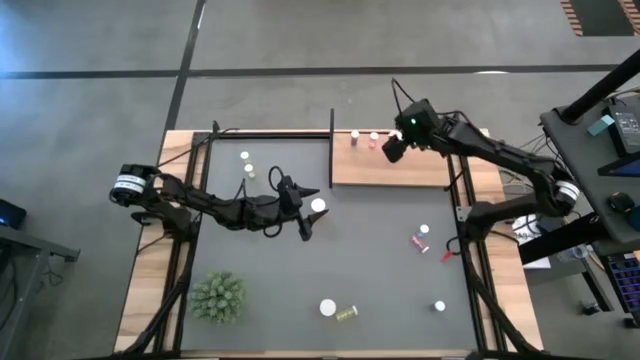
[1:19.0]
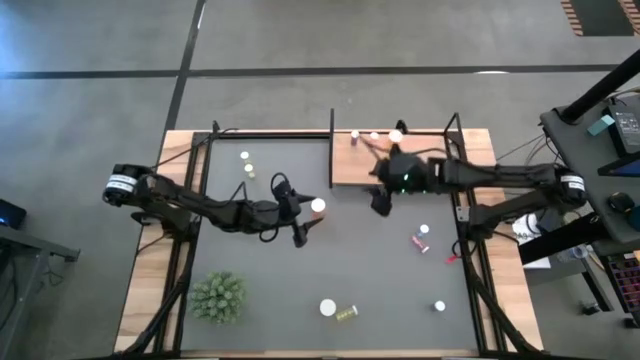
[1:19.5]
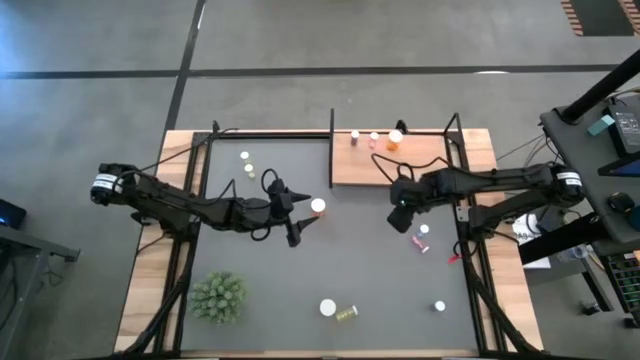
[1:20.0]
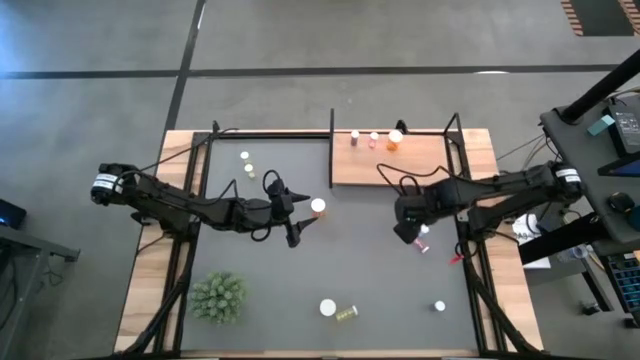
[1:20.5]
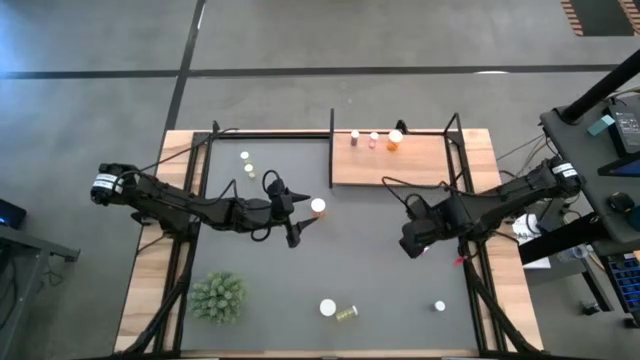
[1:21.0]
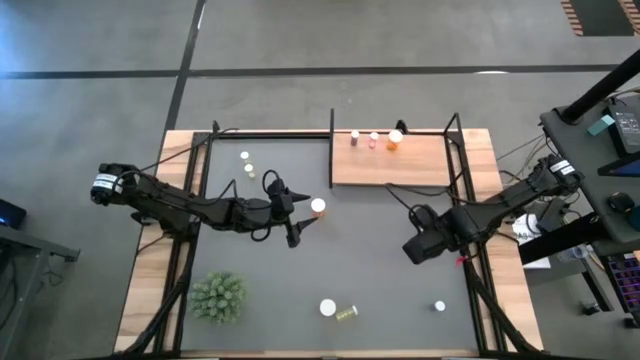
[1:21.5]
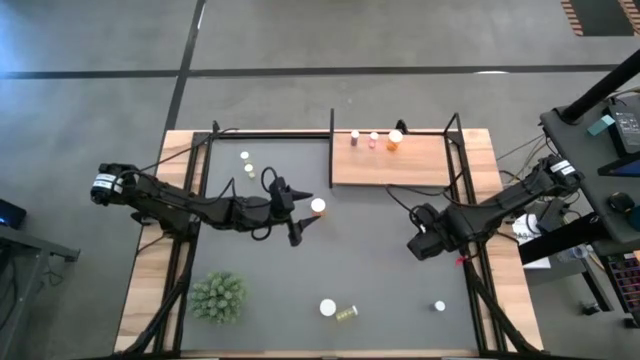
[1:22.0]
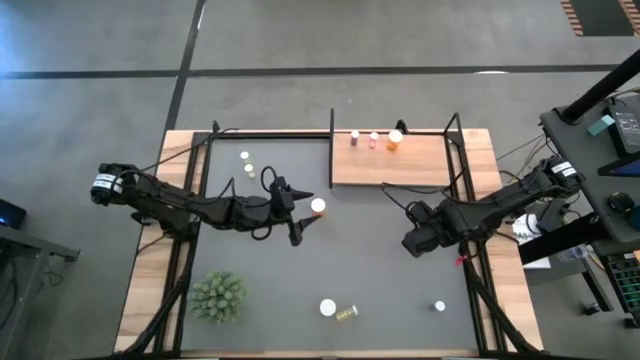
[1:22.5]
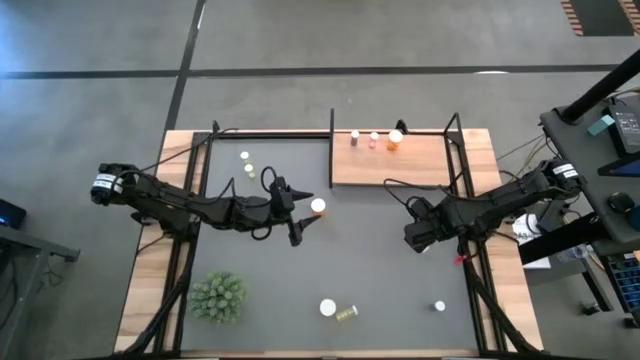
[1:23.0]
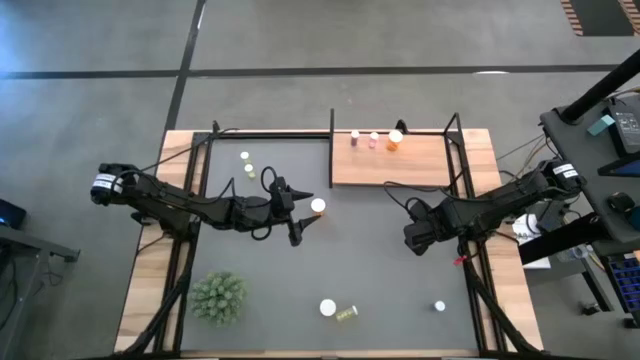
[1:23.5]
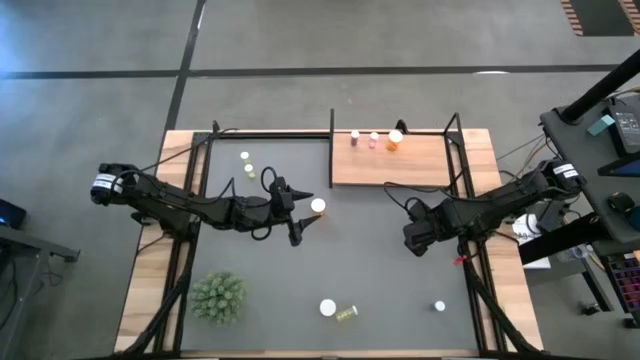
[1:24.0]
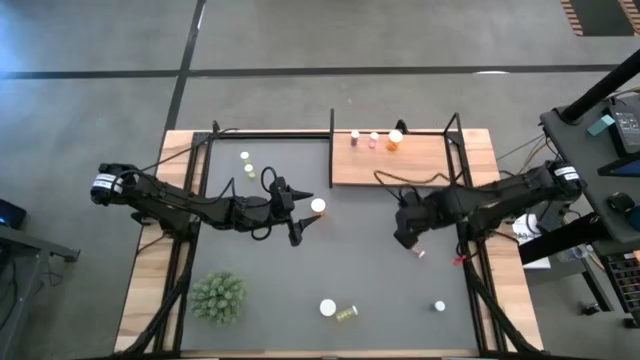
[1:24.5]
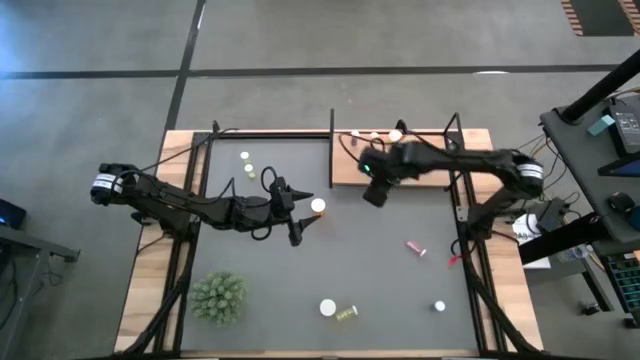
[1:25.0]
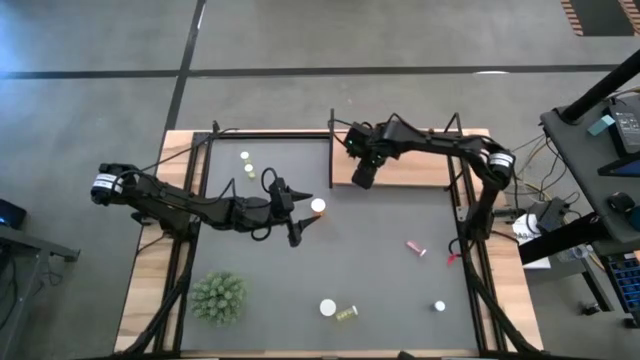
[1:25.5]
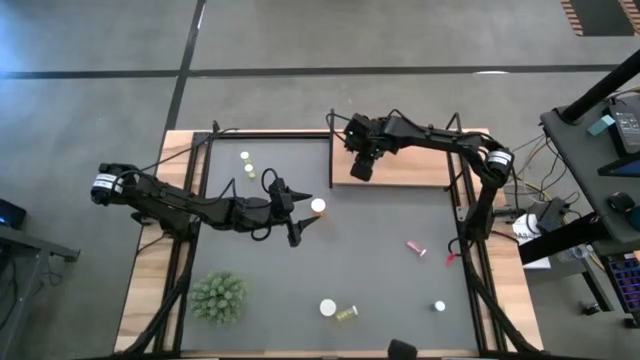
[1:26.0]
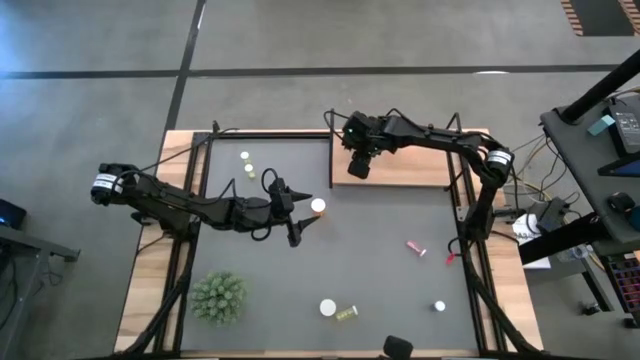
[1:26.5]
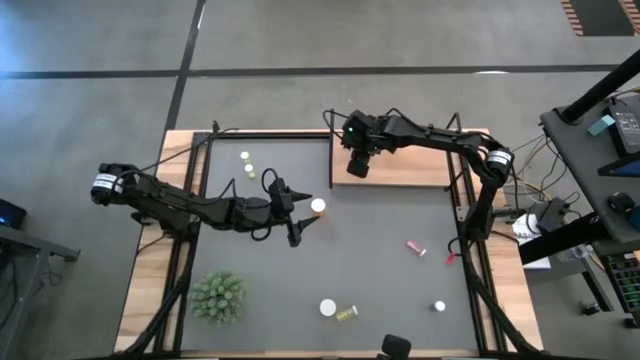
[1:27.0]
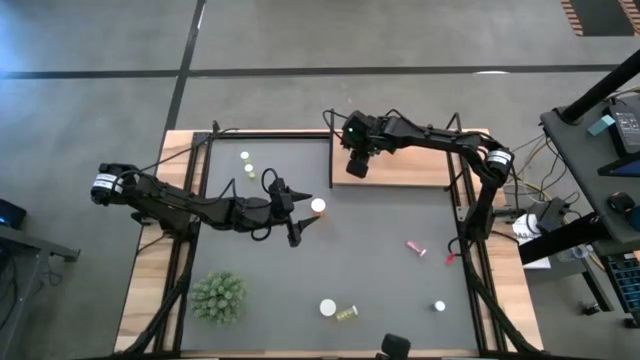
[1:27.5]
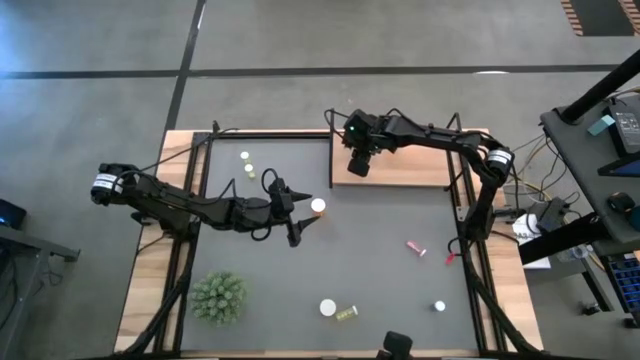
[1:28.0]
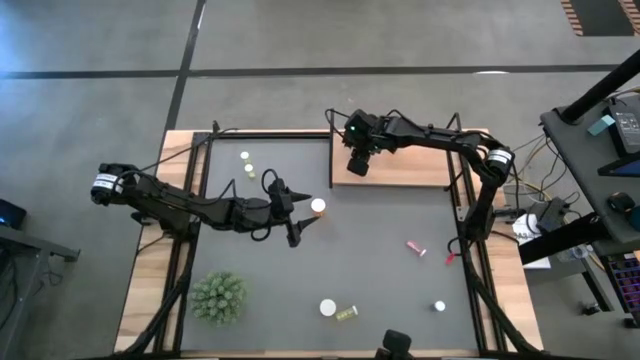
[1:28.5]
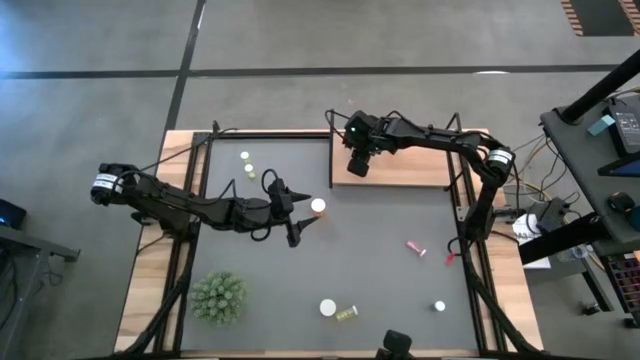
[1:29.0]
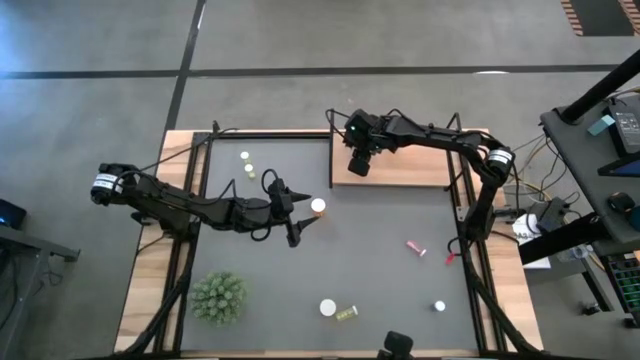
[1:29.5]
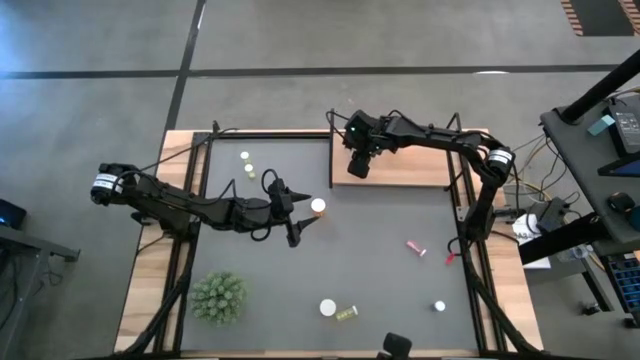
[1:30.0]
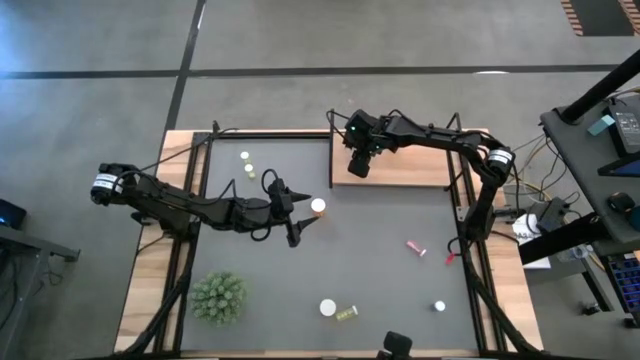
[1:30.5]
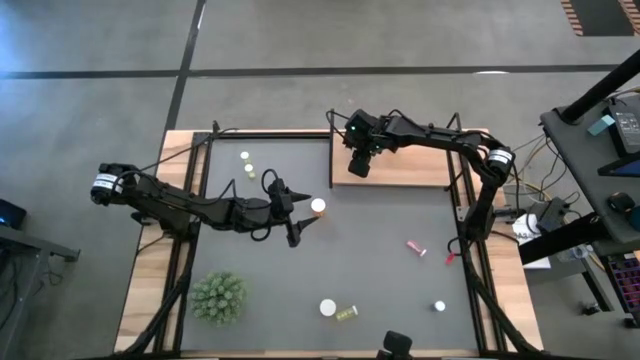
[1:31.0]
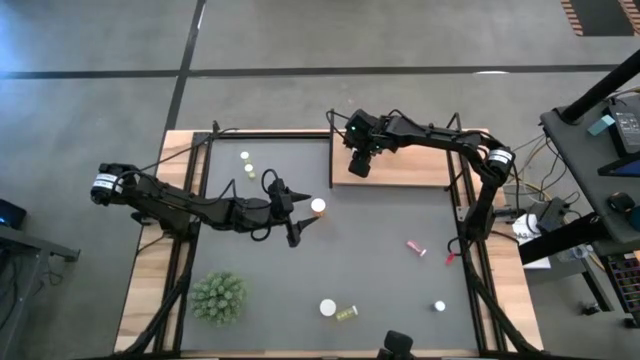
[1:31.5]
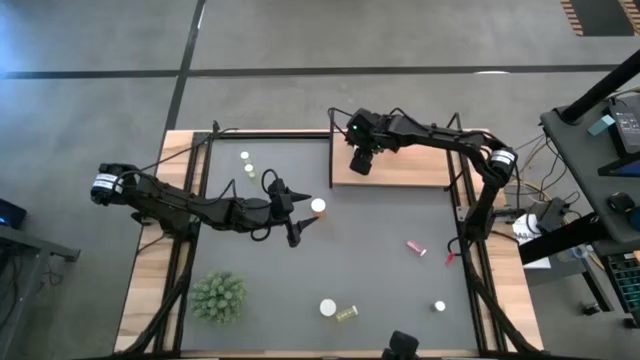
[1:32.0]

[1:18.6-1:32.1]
Task: Pick and place medicine bottles onto shelf by color
Put the top blue pill bottle on the shelf aligned with the other blue pill bottle

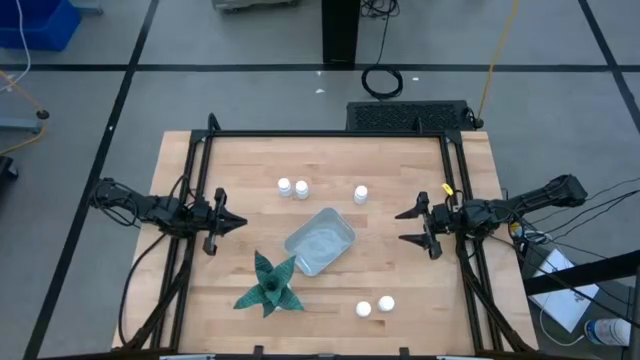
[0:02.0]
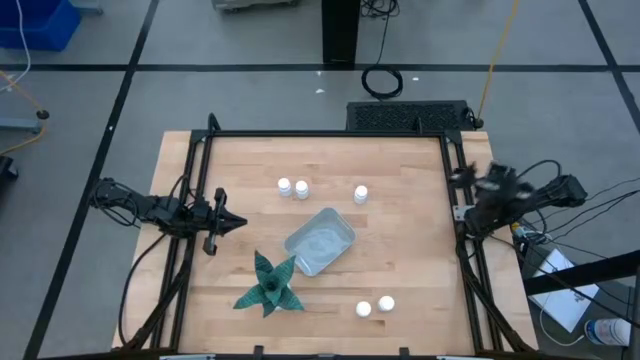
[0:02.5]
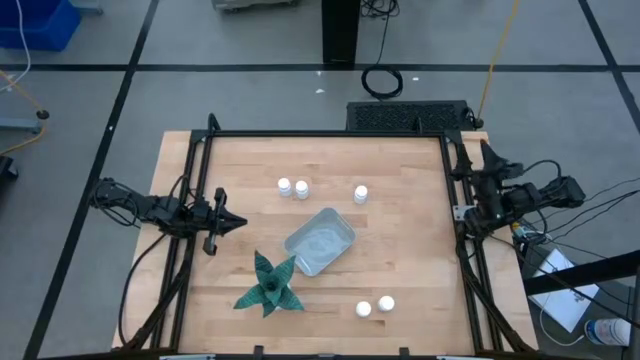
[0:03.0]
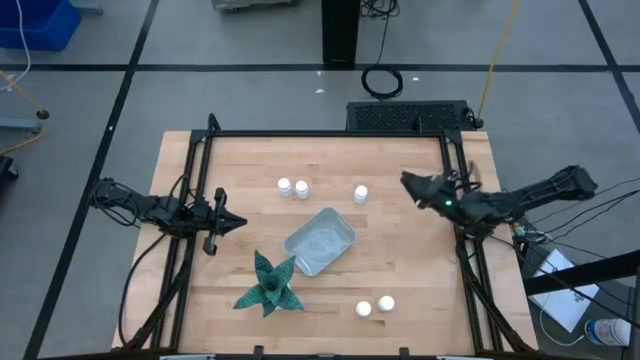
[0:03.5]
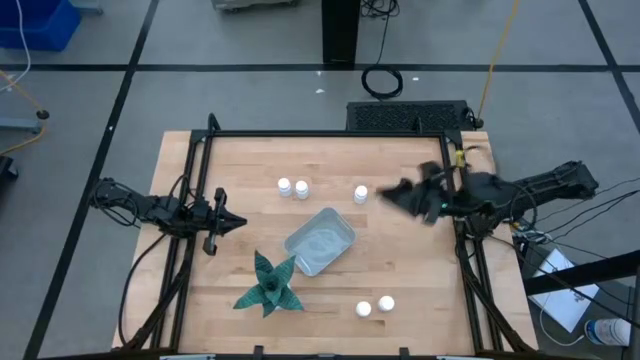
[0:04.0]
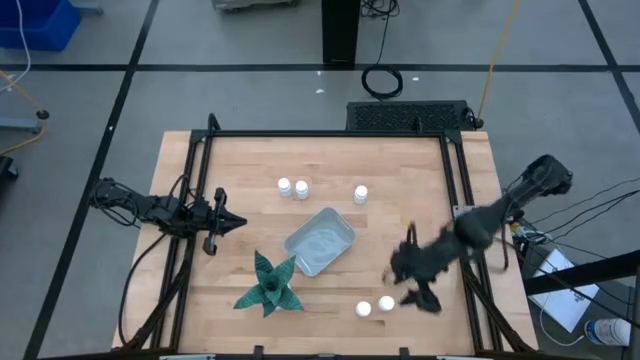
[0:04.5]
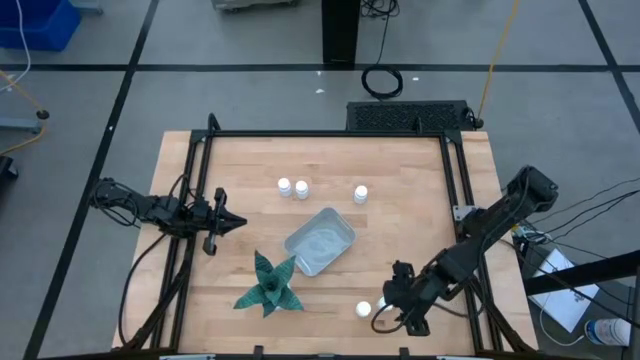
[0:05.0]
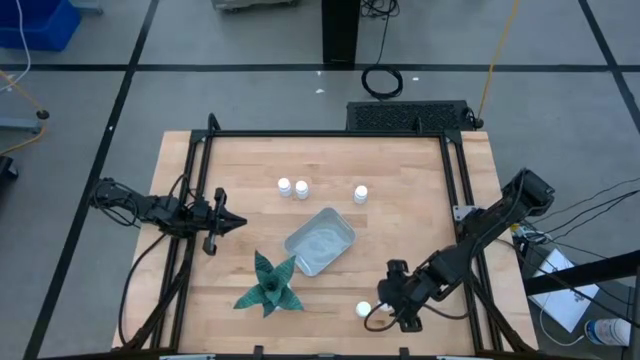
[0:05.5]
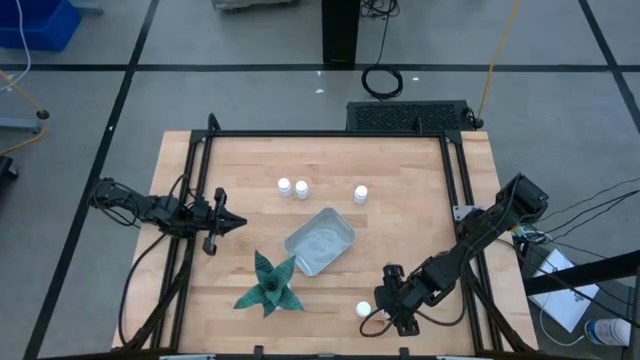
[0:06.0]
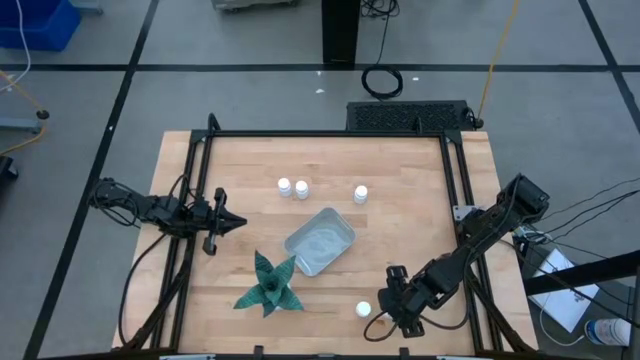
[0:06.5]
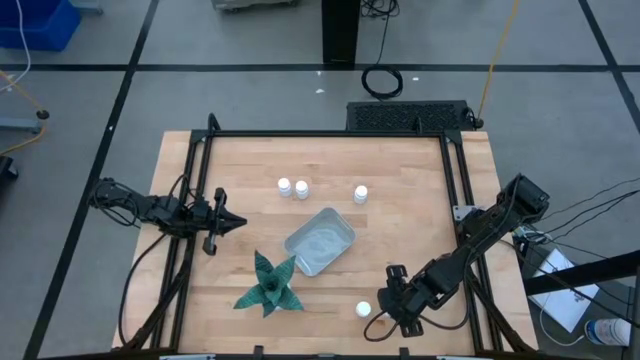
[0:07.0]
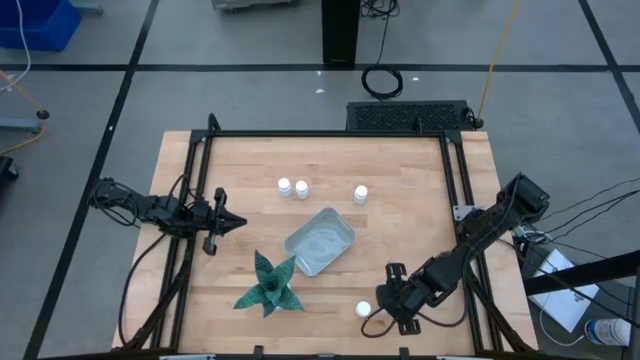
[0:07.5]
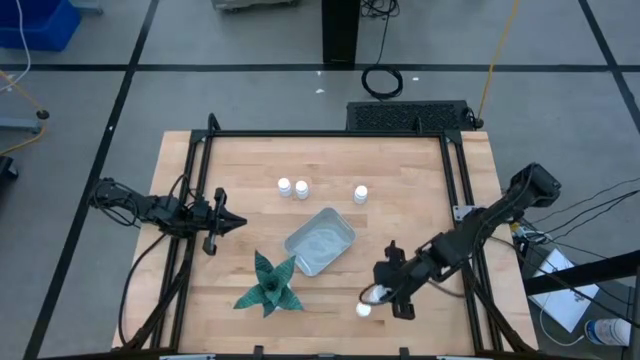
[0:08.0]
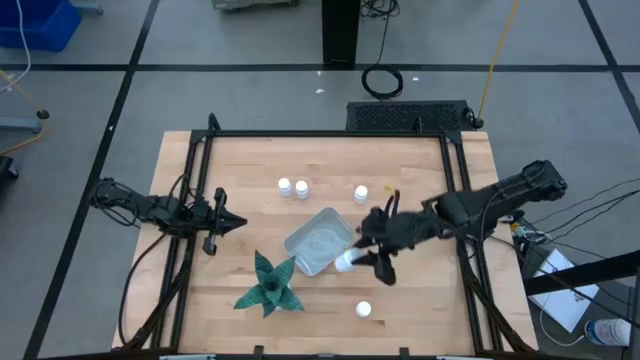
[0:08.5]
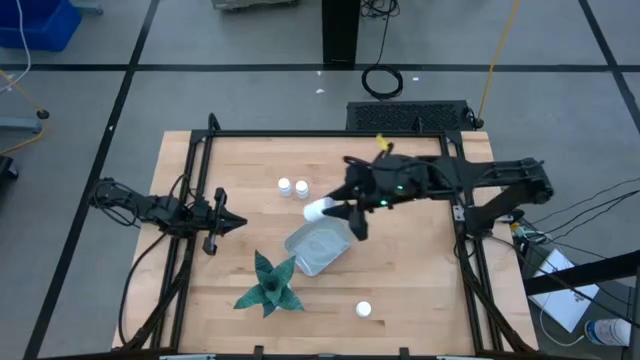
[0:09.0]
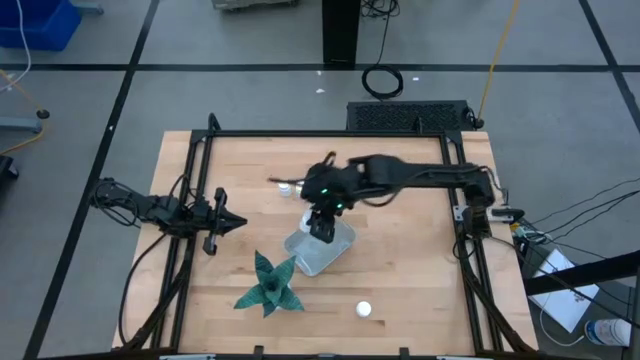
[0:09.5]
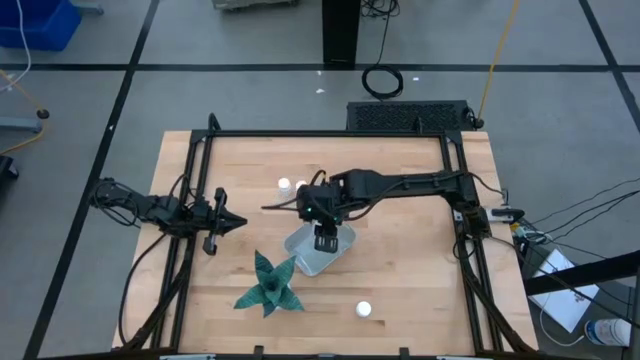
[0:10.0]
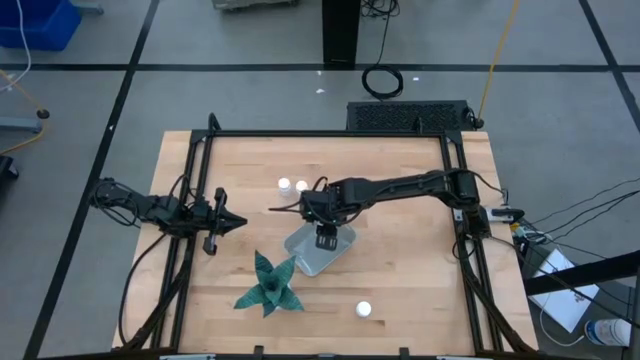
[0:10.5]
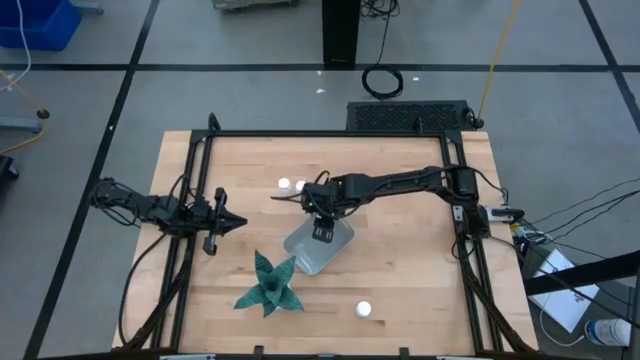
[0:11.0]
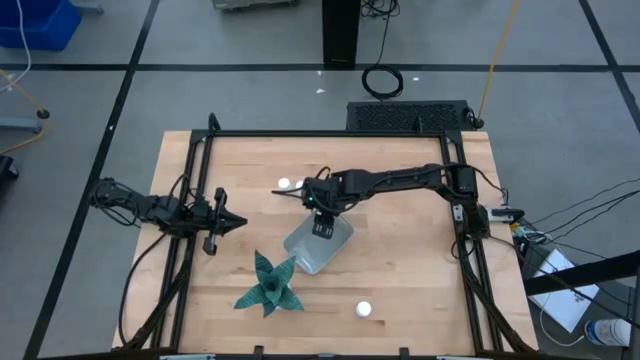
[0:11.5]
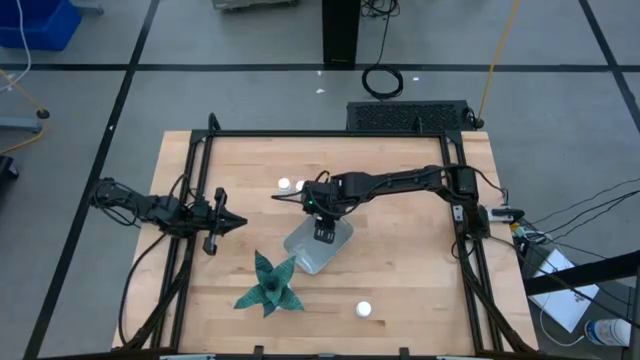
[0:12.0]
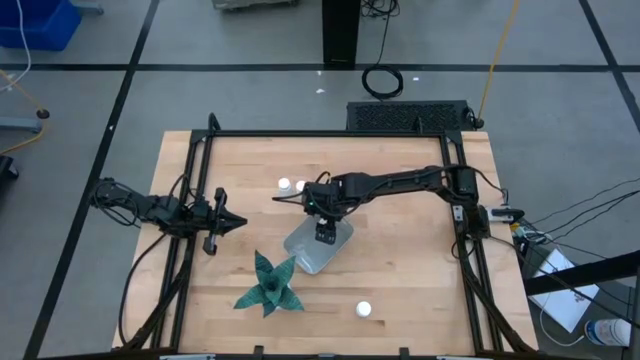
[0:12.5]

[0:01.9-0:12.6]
Task: Pick and place pill bottles into a basket
Put the white pill bottle into the gray bin
